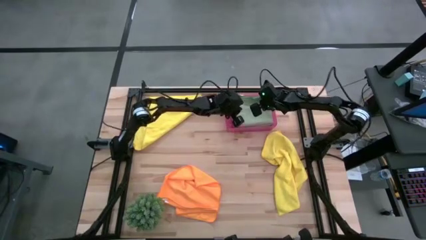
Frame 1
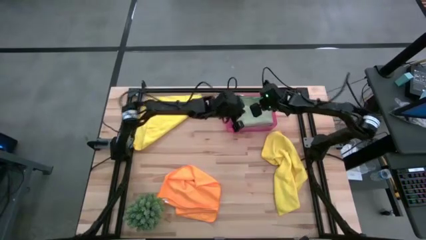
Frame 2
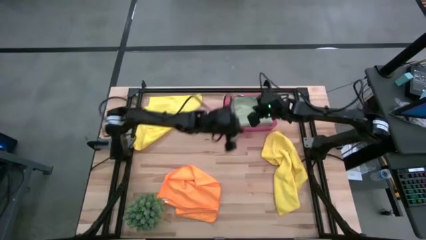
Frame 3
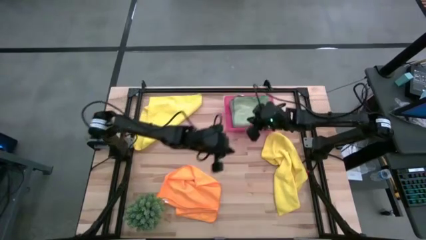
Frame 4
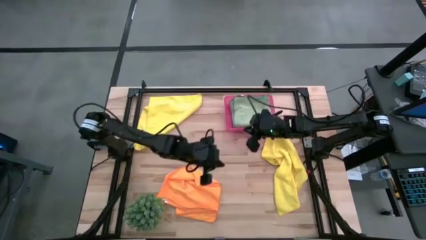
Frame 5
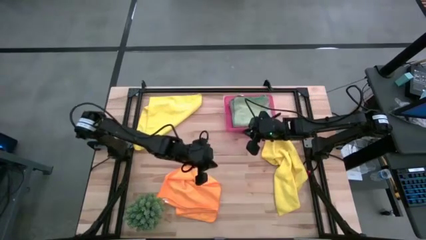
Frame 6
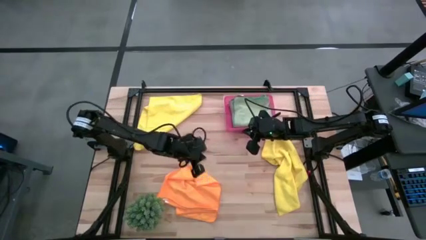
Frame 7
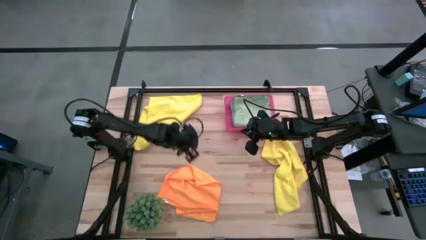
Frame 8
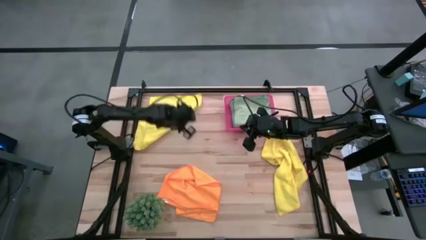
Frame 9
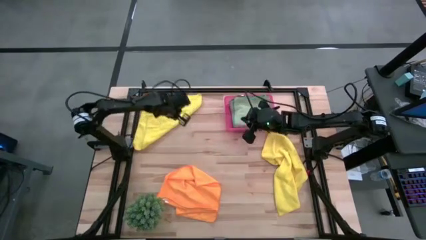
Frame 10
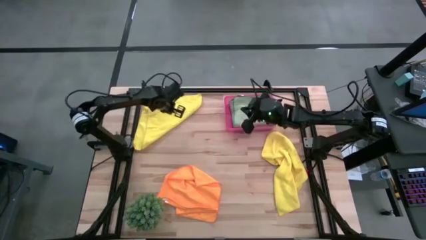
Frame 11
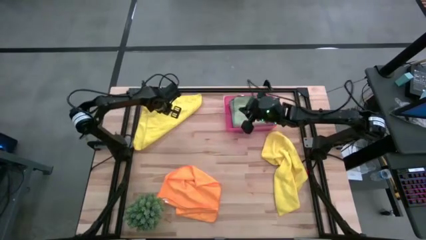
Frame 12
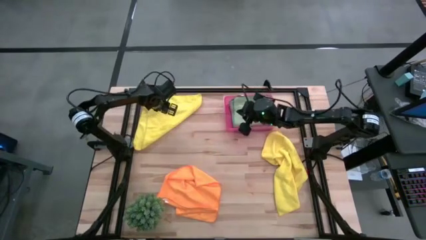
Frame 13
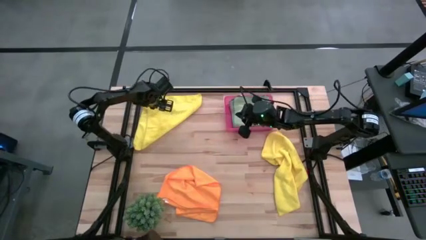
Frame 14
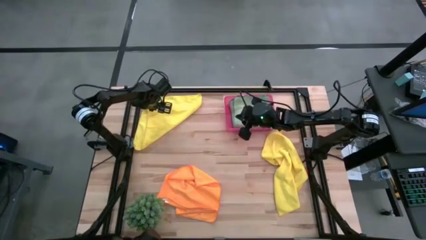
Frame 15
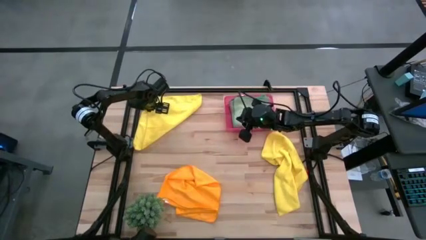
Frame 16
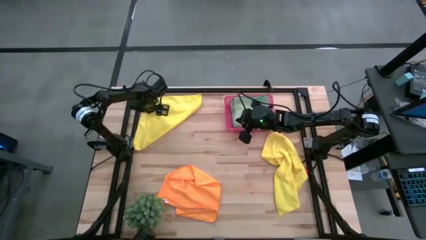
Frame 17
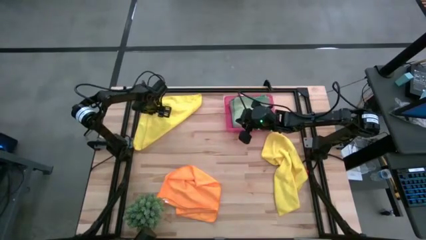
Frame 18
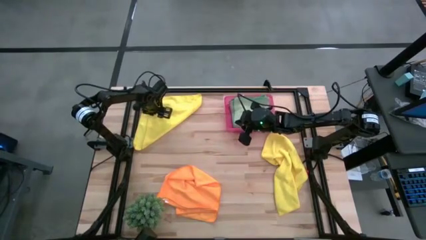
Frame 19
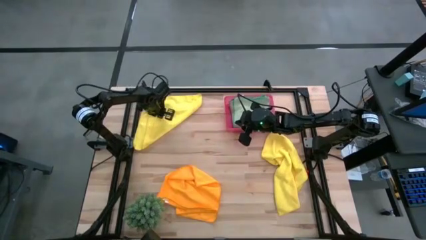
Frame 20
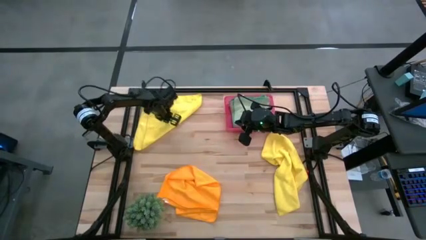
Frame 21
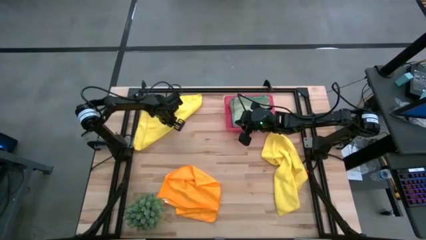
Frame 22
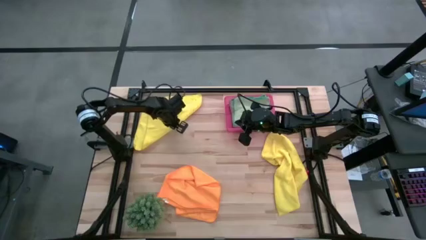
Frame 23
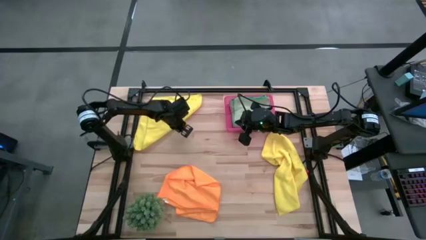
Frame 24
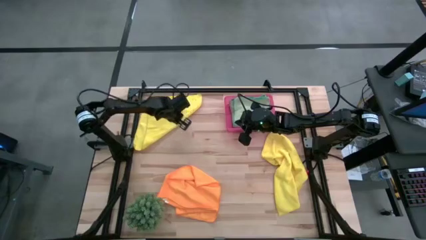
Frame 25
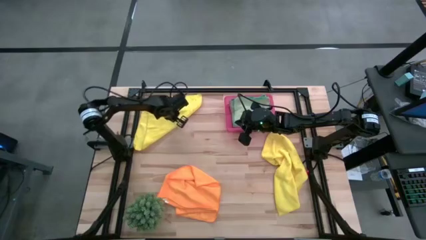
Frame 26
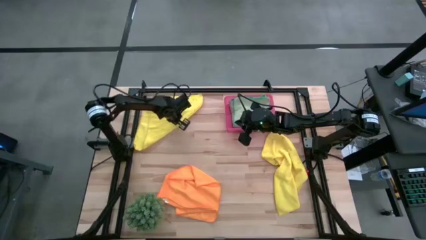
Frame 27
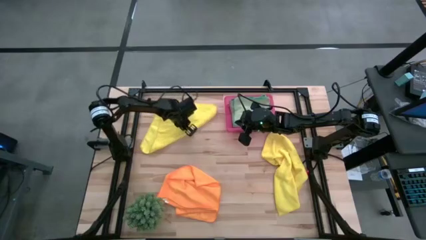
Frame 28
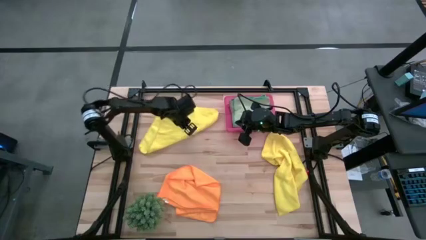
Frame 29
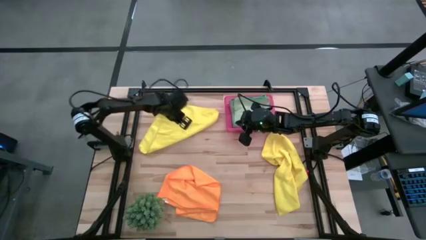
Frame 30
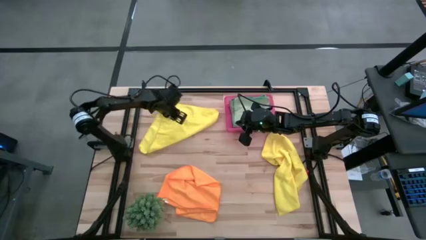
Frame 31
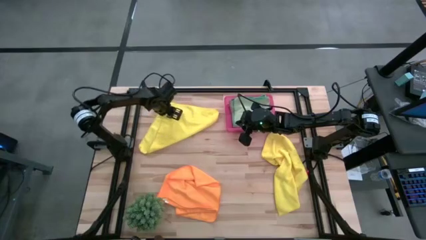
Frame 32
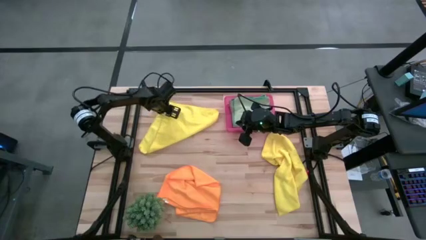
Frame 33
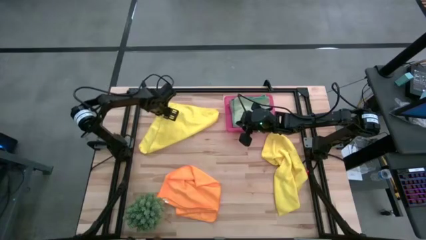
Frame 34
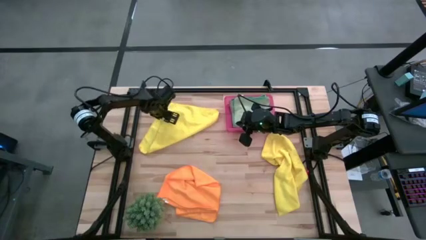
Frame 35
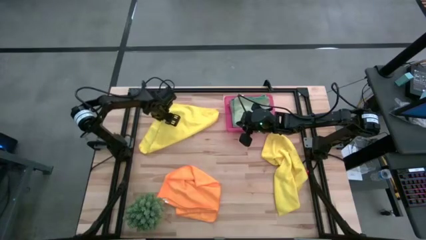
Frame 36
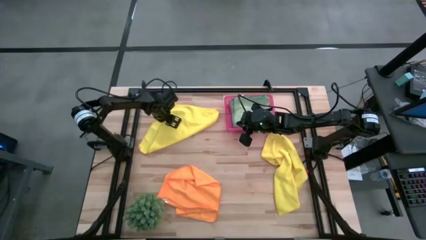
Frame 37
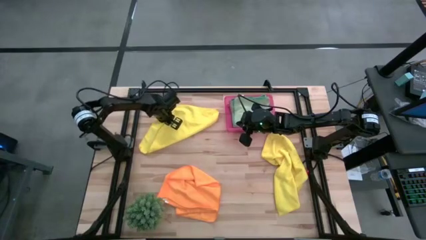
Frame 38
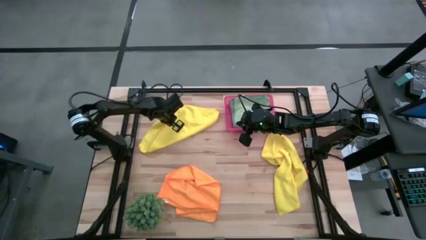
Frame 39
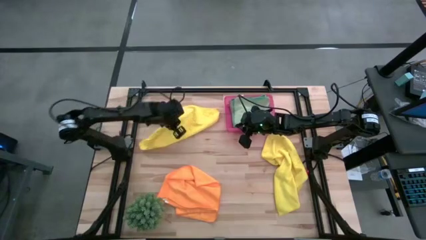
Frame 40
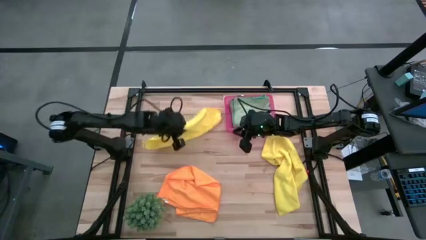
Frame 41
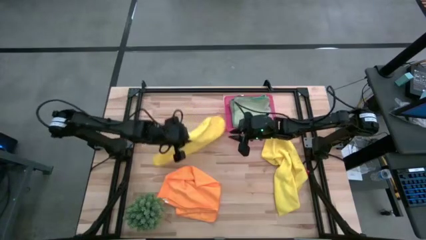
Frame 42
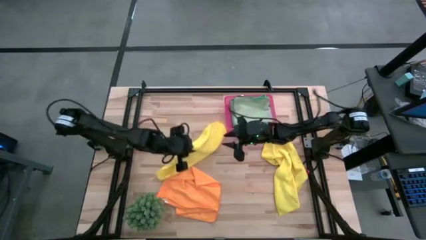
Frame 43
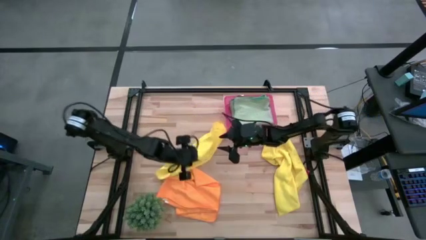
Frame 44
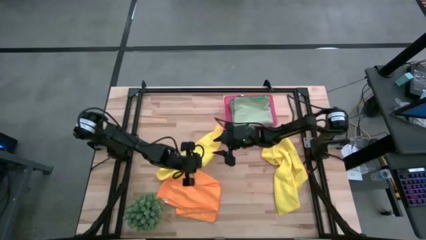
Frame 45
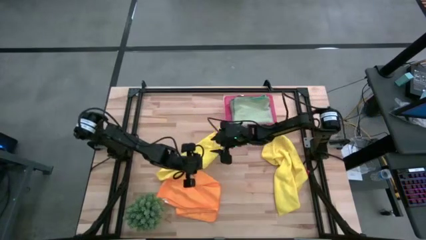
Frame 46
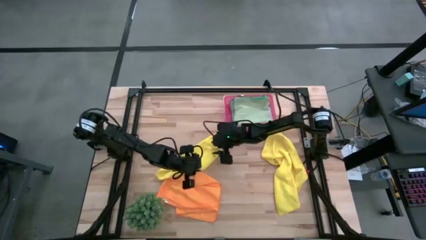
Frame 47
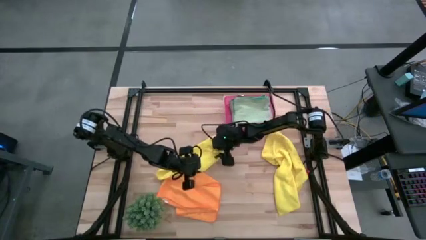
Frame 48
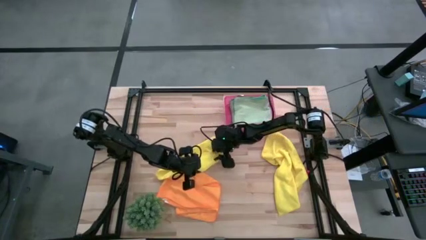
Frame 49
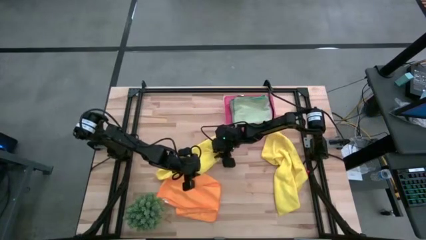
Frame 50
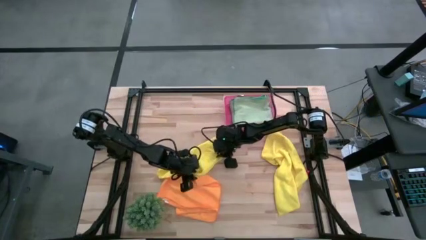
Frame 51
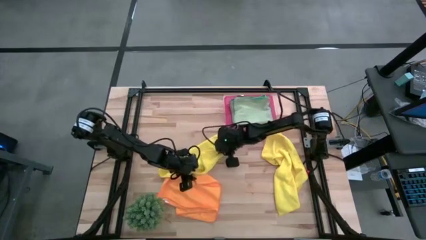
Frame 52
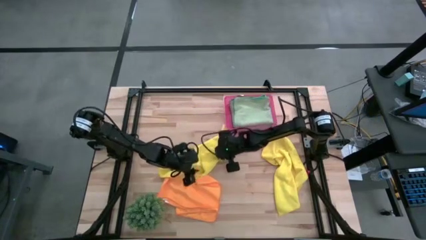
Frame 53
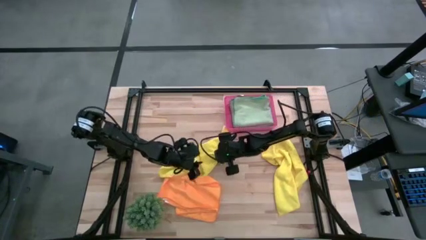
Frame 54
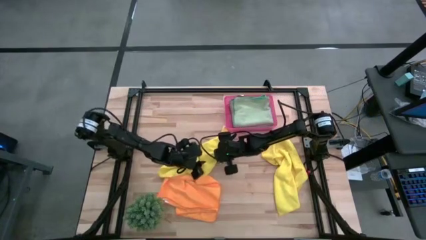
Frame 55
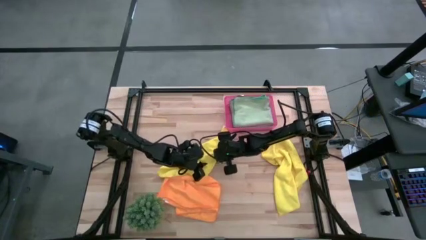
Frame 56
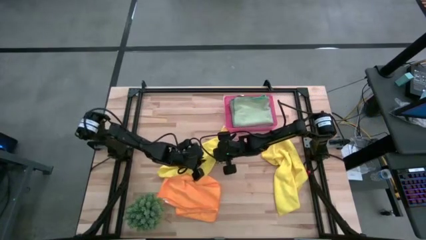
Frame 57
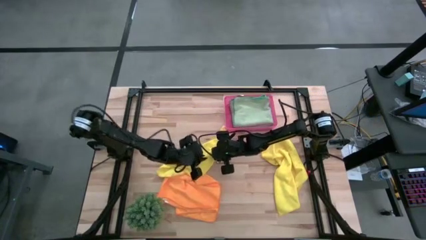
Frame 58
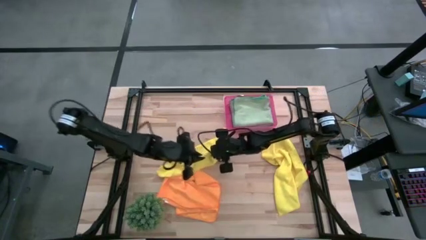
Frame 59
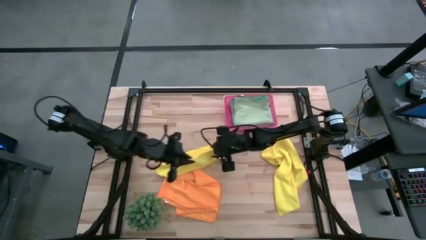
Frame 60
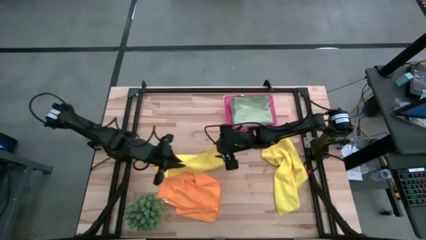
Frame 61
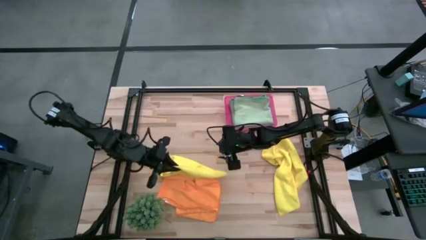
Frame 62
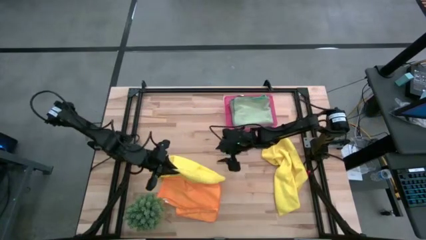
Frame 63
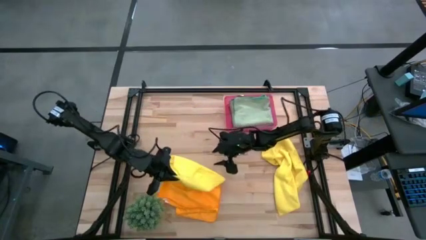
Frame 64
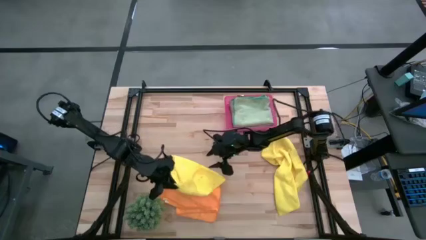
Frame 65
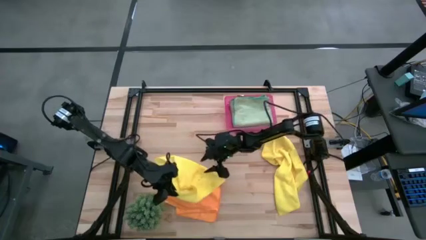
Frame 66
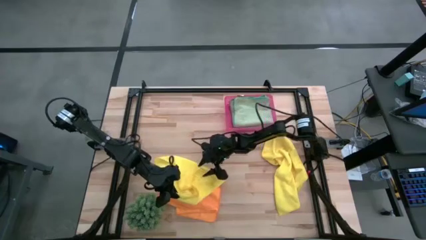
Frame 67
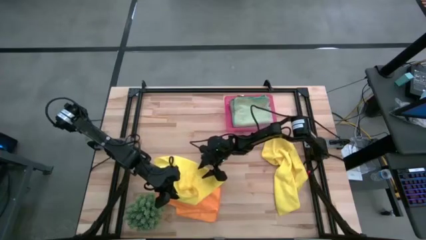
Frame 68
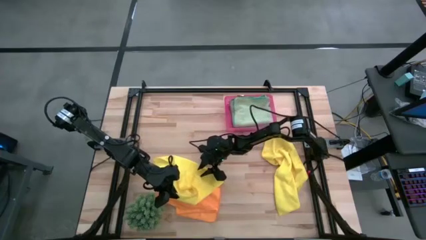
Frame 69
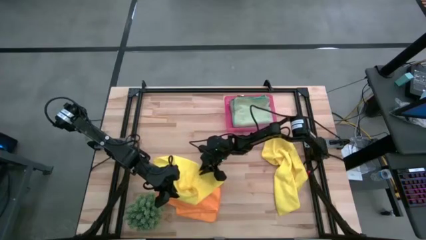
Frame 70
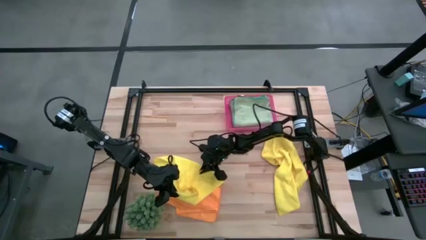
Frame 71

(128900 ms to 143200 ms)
Task: Fold microfiber towels
Fold the top yellow microfiber cloth
